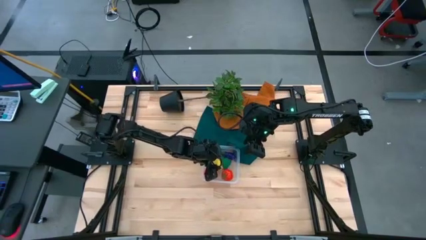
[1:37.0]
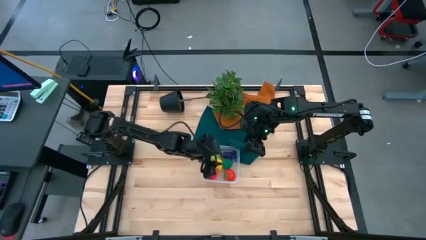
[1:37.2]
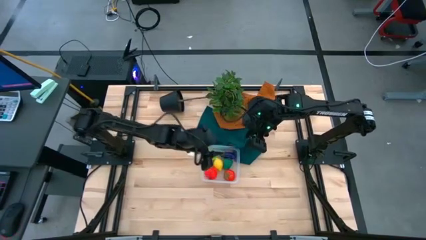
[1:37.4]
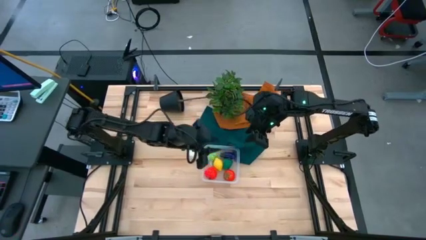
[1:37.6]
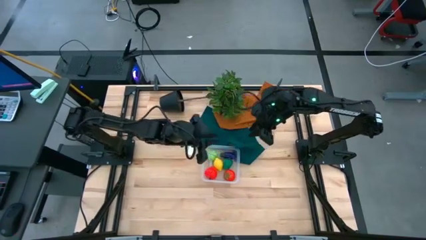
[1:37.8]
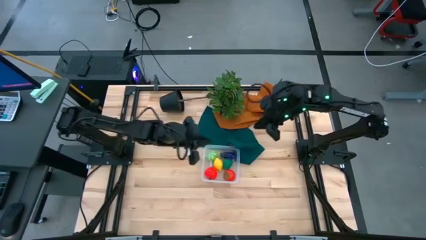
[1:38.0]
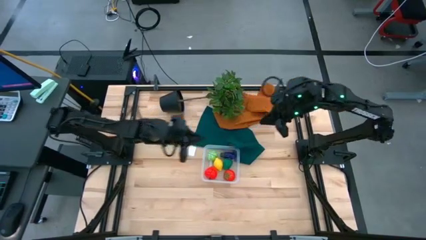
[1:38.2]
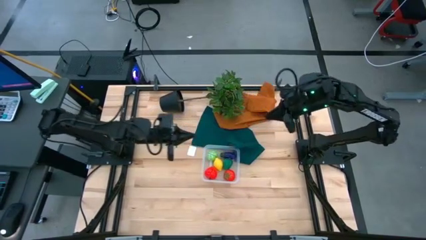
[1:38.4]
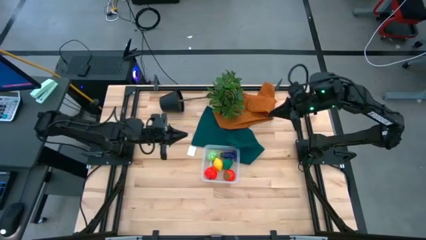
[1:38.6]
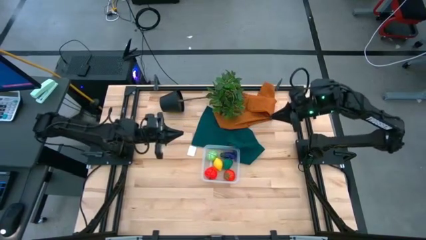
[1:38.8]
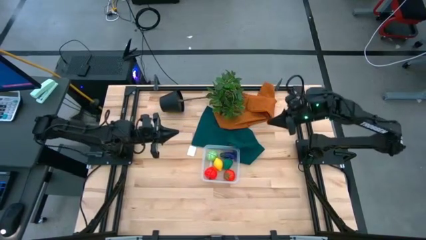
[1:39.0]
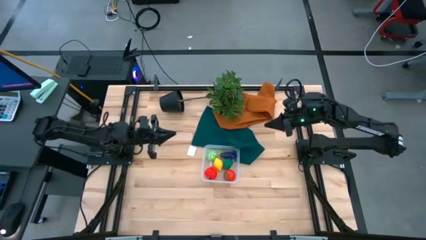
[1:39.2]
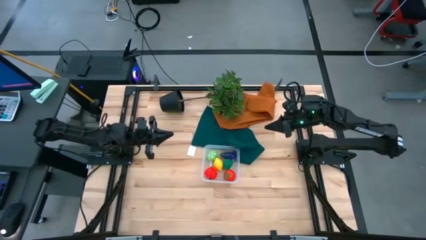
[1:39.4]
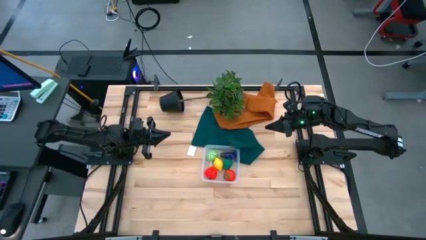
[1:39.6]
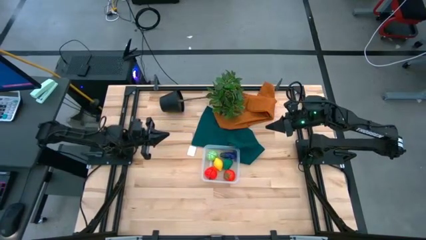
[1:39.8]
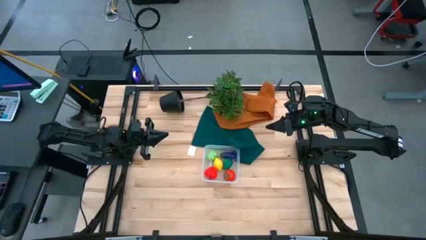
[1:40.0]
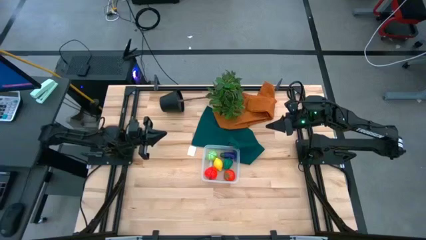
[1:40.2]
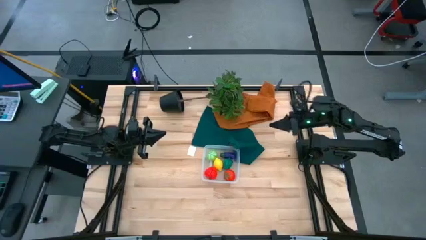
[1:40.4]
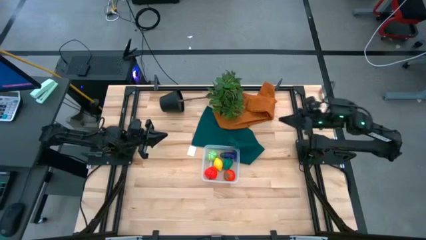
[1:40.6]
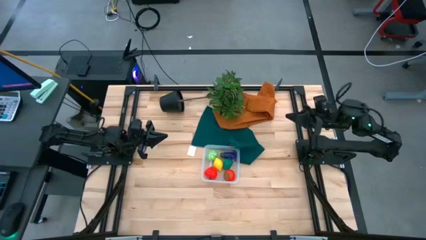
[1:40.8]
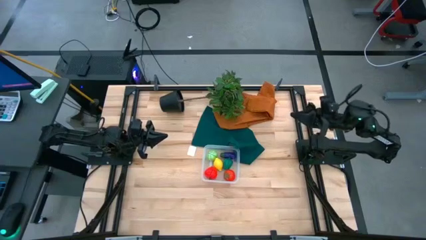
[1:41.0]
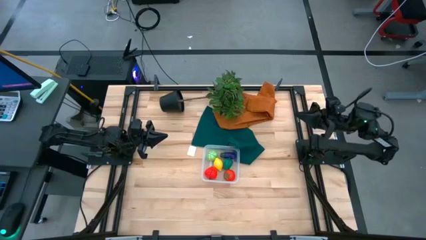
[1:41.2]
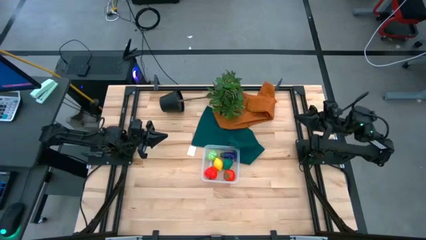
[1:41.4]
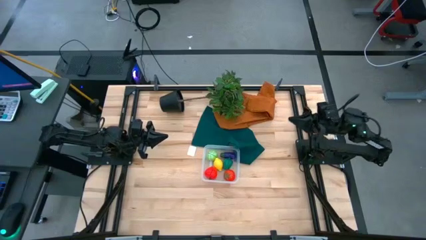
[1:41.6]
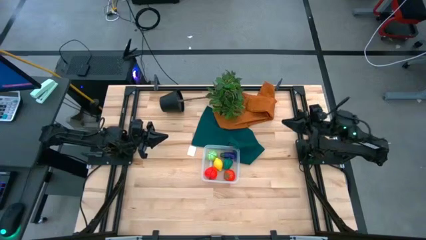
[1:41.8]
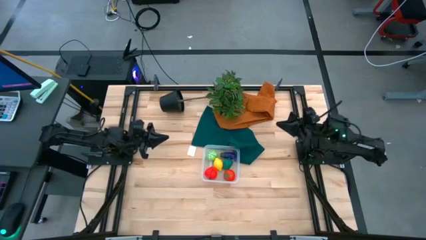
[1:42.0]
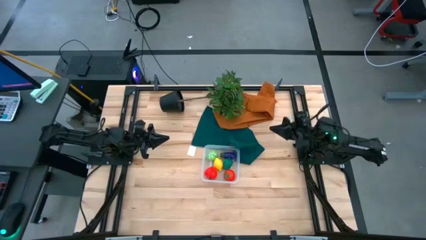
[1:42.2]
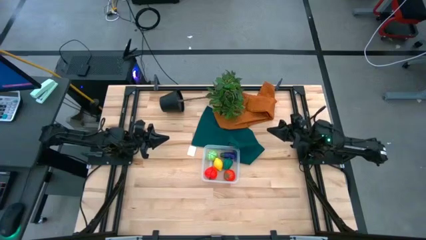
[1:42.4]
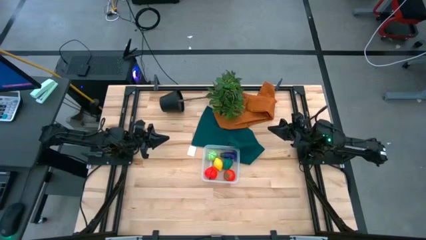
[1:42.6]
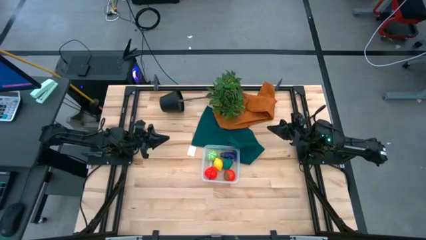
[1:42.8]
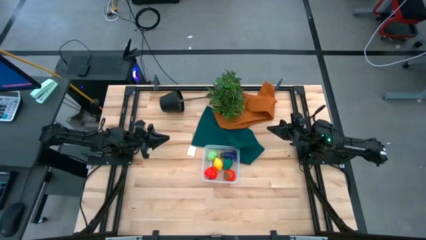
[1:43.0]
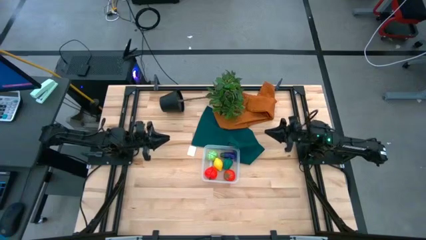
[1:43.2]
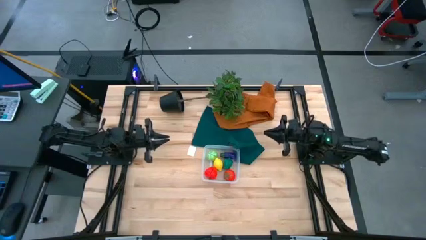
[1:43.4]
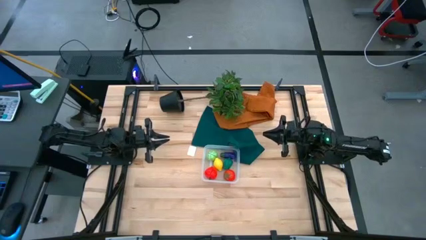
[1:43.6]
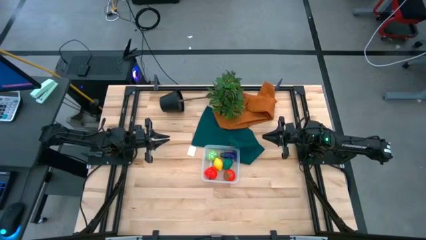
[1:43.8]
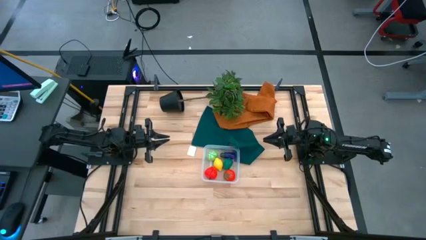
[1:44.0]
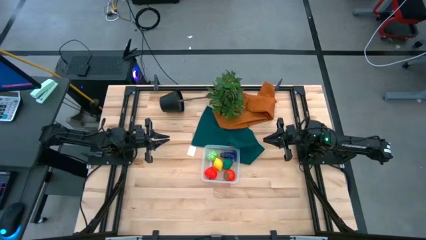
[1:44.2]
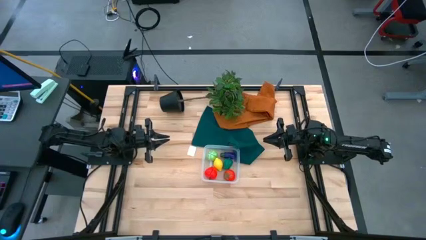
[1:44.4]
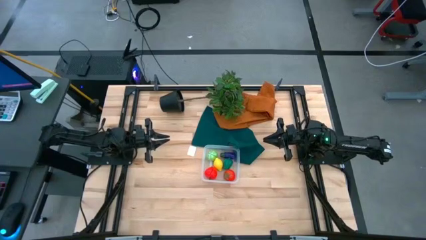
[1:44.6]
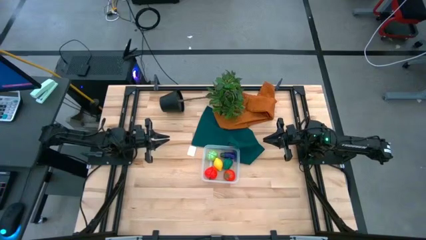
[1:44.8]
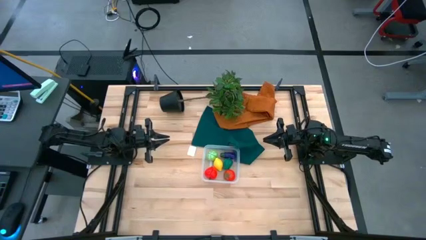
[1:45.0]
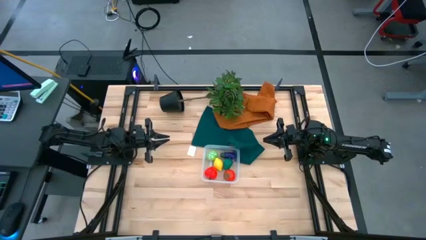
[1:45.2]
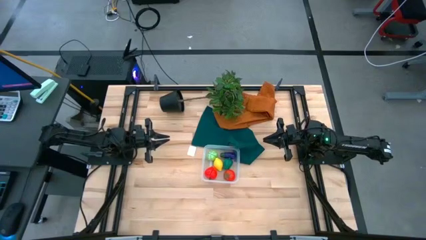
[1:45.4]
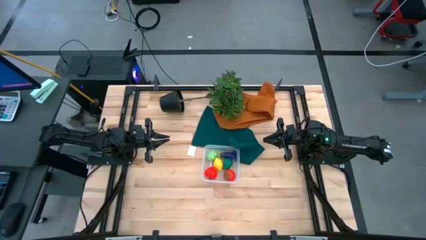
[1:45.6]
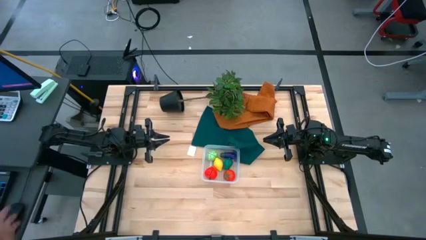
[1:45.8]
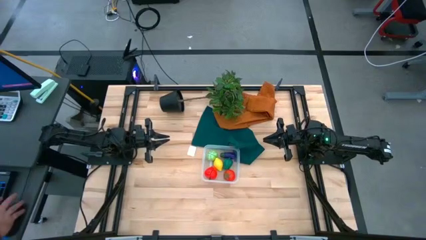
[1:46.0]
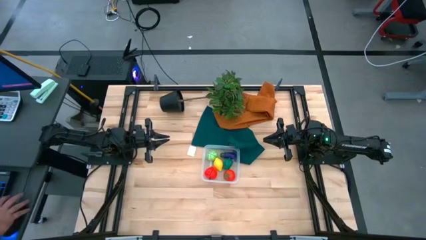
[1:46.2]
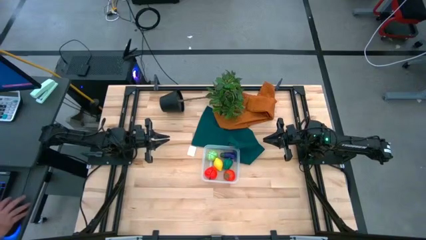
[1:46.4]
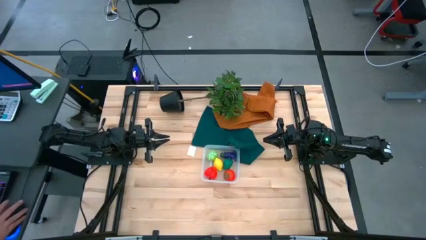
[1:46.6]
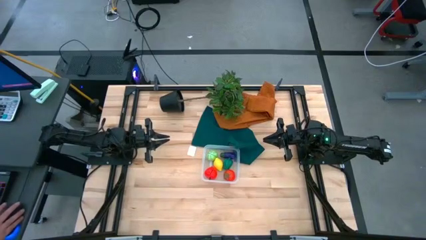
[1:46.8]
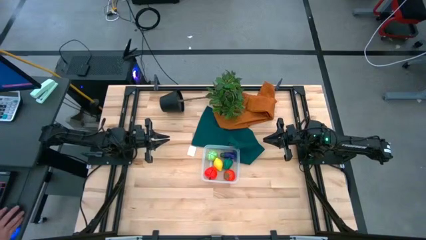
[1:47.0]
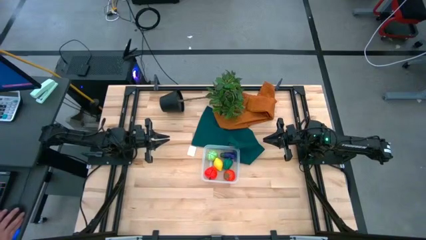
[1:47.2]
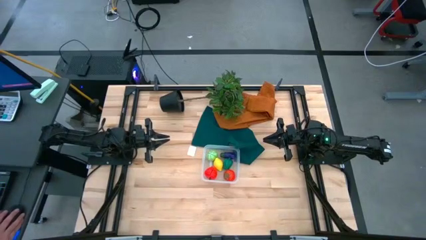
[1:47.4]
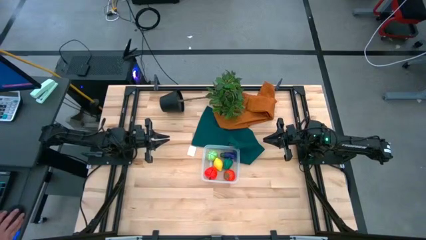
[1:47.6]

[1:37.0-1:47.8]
Task: Pick and placing Produce into tupperware
Return to Home Position
